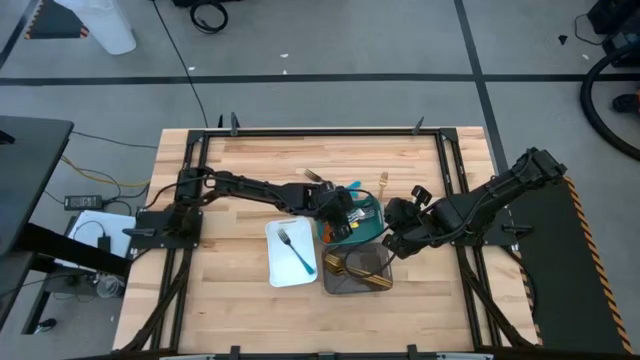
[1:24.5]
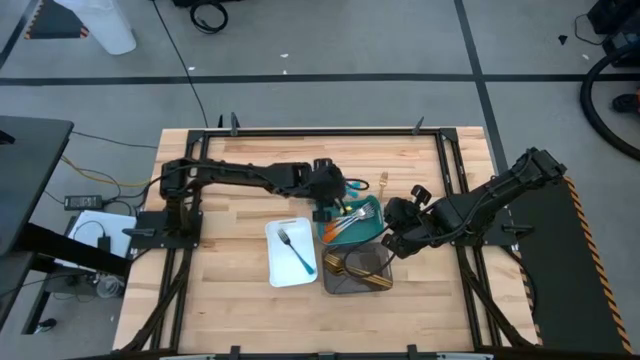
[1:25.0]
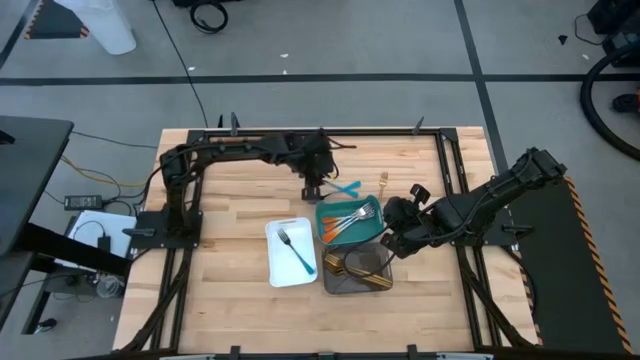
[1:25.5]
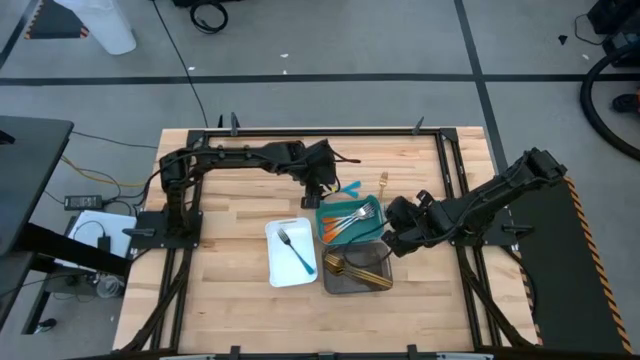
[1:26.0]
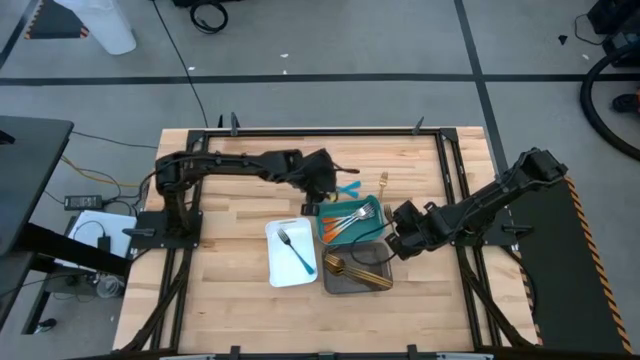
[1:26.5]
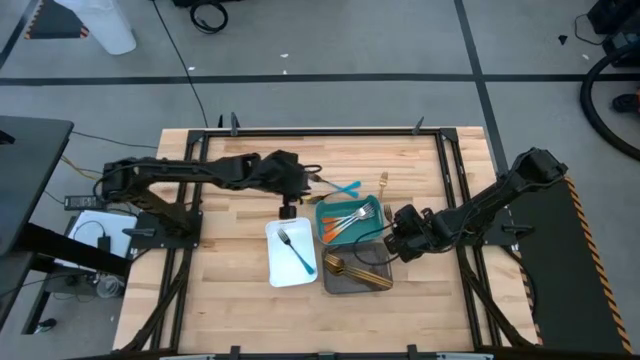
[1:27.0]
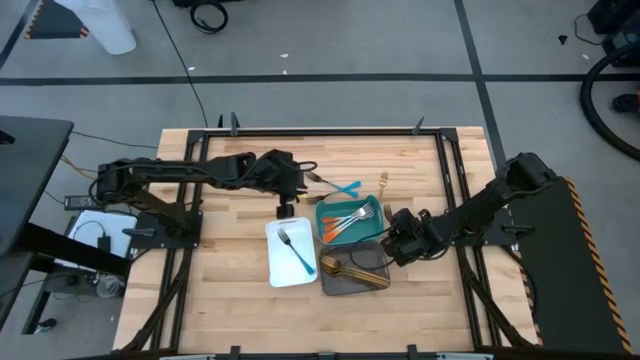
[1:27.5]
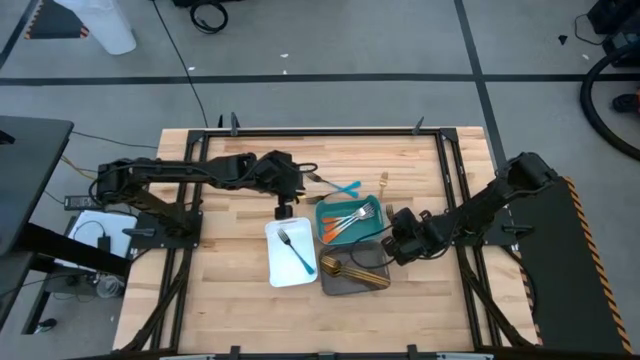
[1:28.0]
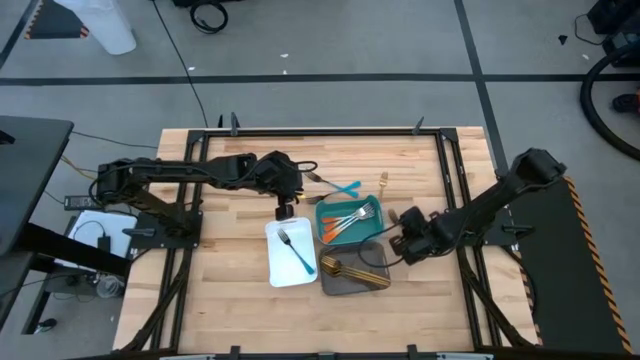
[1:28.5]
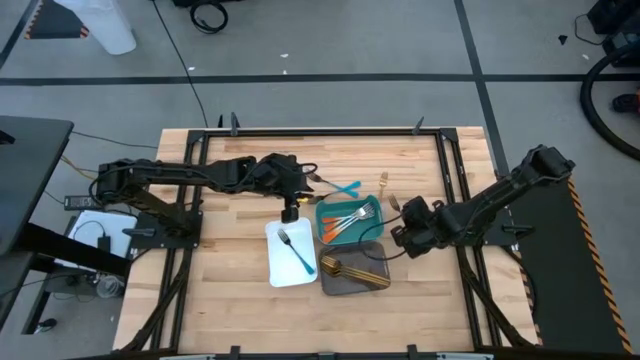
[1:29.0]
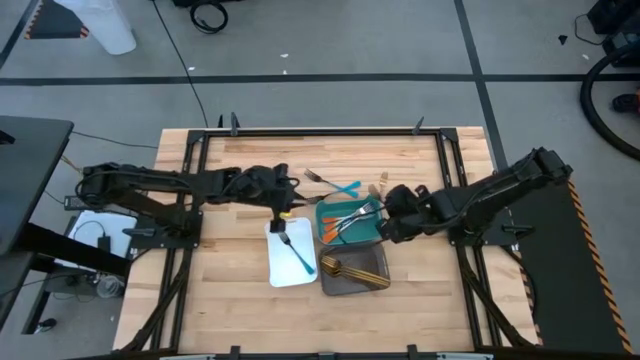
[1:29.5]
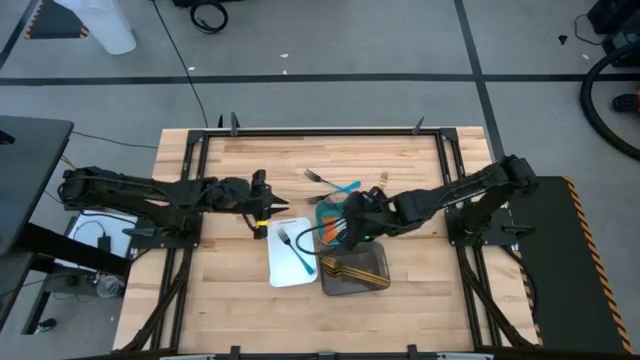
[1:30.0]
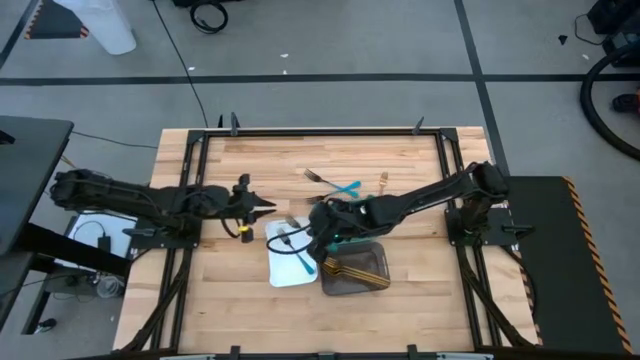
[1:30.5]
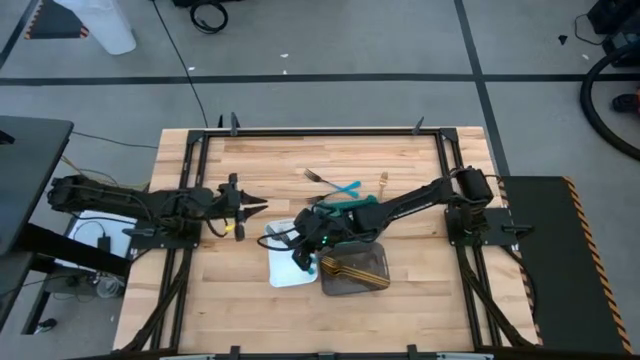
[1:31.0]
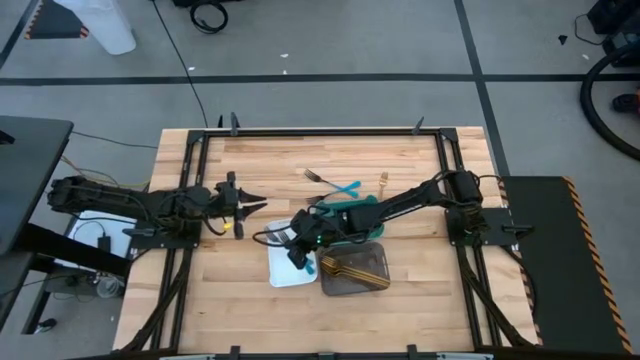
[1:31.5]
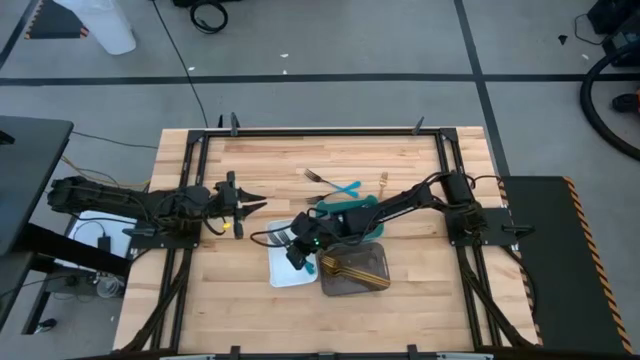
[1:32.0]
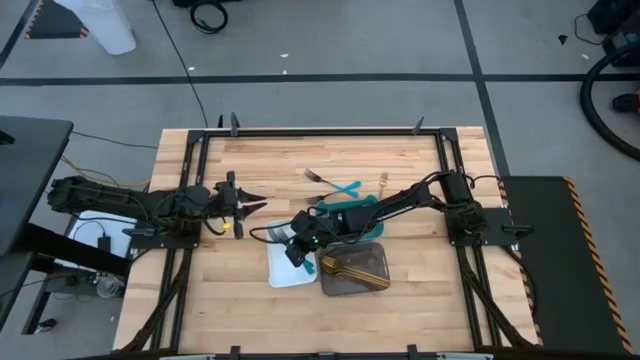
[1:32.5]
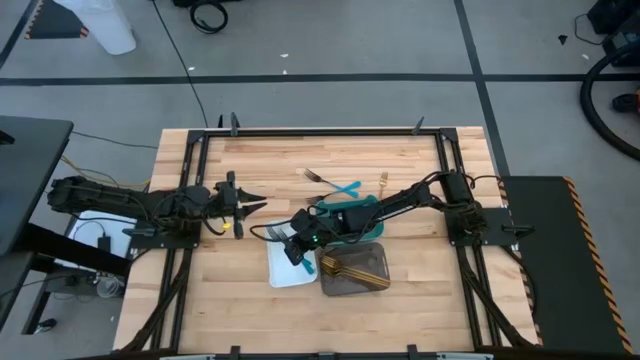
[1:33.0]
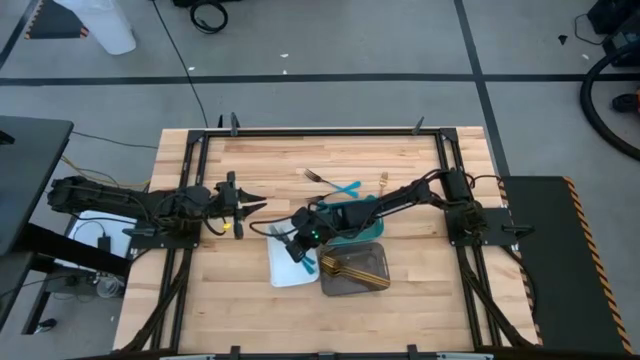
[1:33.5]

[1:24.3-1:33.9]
Task: Sort silverware by color (type)
Put the blue fork into the white bin

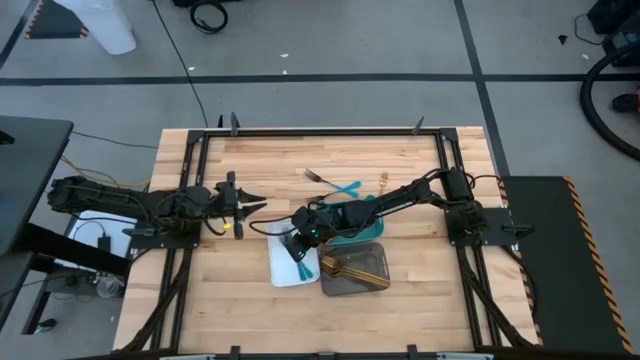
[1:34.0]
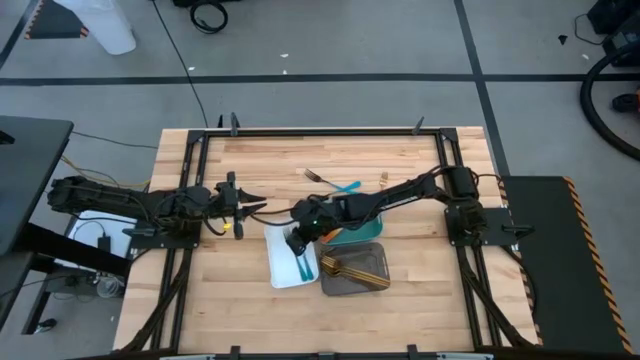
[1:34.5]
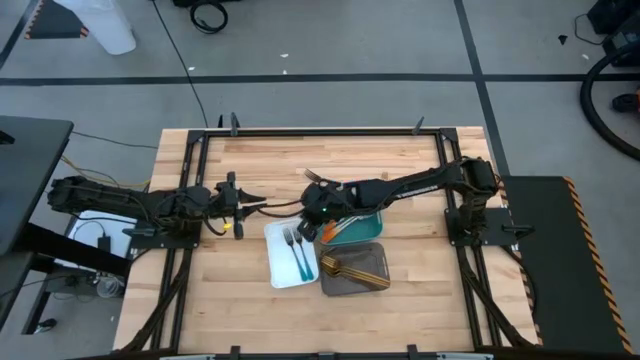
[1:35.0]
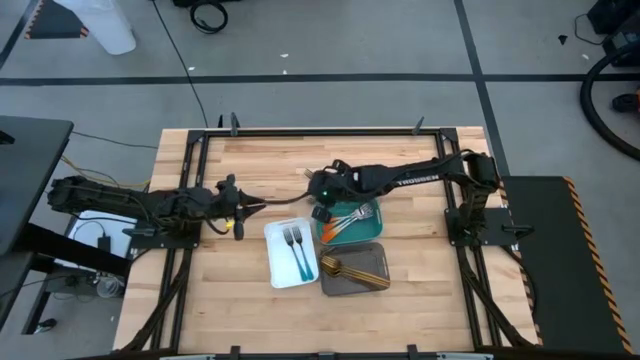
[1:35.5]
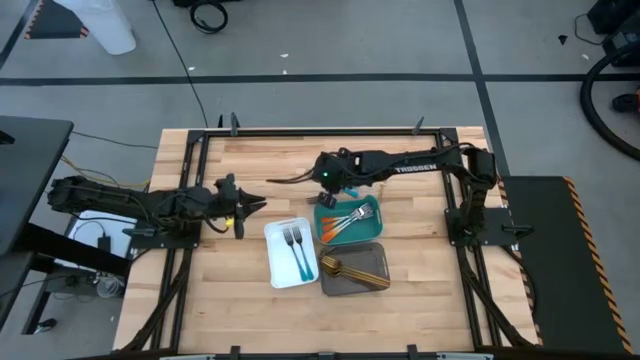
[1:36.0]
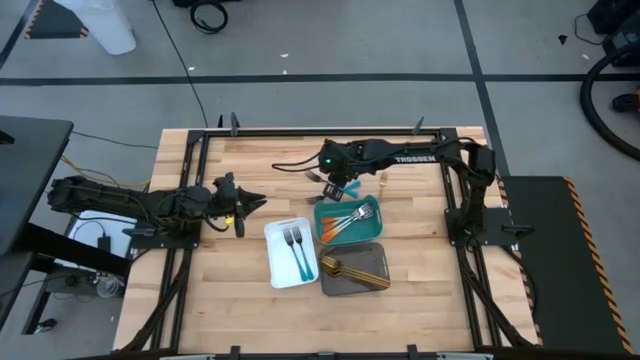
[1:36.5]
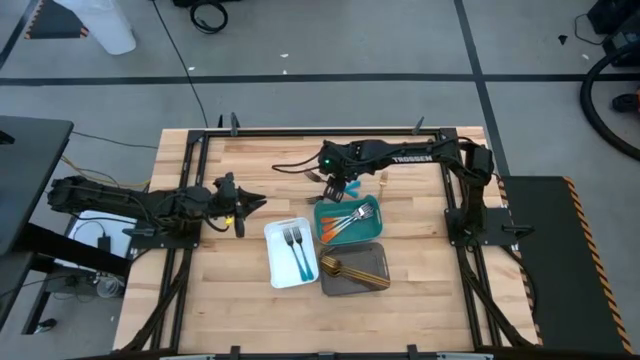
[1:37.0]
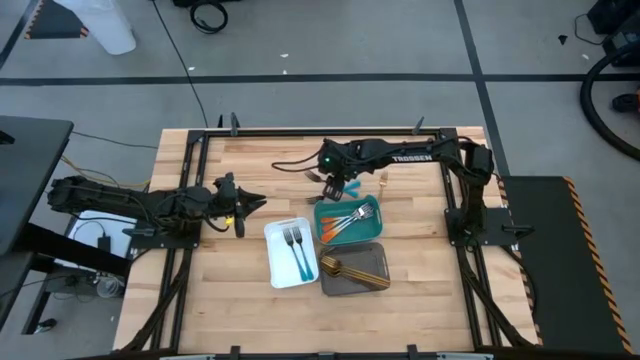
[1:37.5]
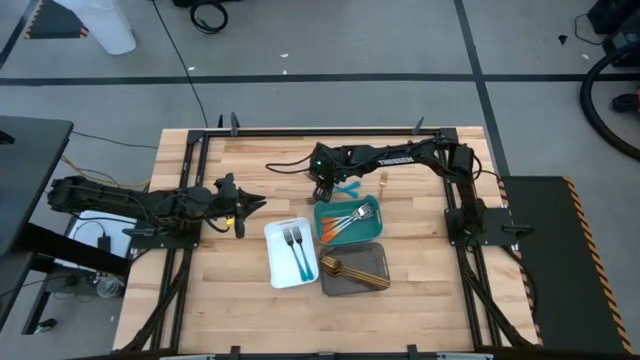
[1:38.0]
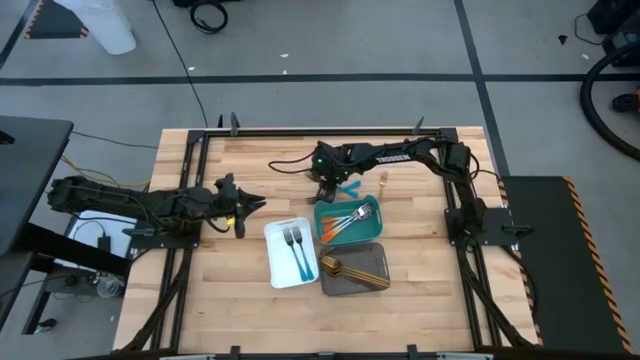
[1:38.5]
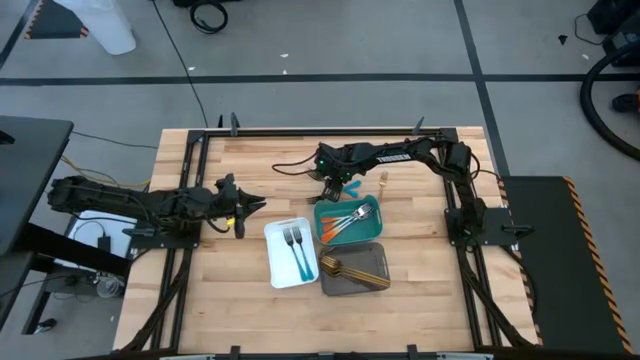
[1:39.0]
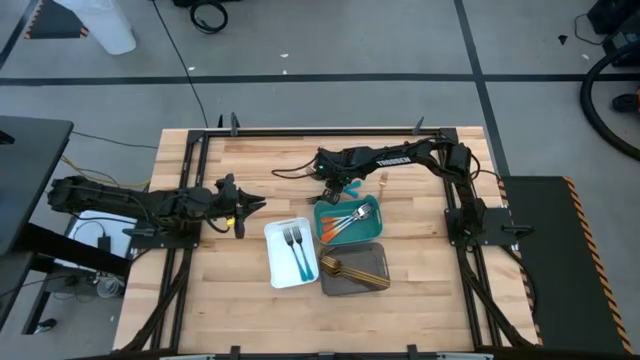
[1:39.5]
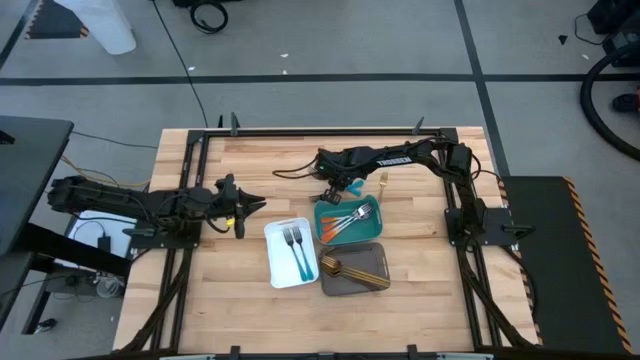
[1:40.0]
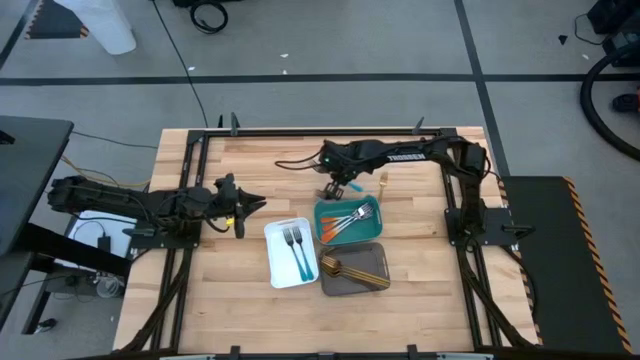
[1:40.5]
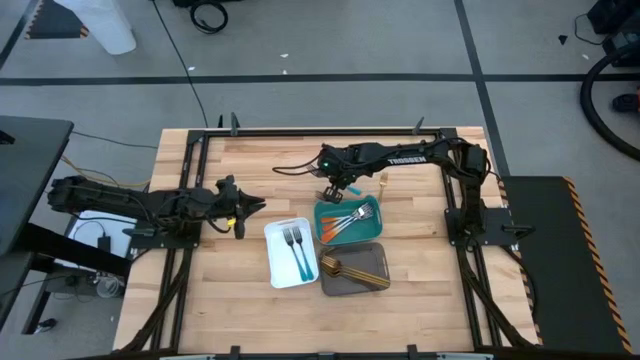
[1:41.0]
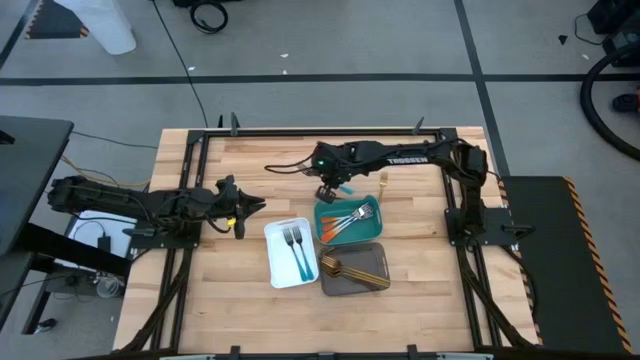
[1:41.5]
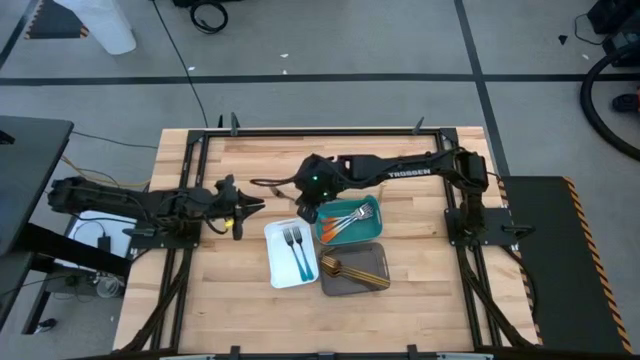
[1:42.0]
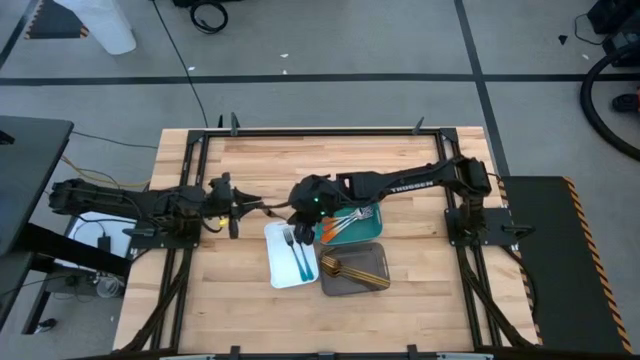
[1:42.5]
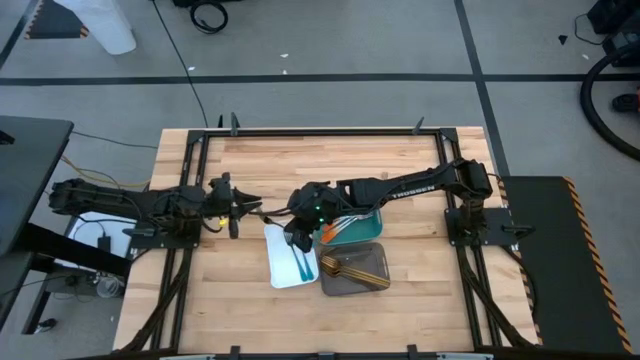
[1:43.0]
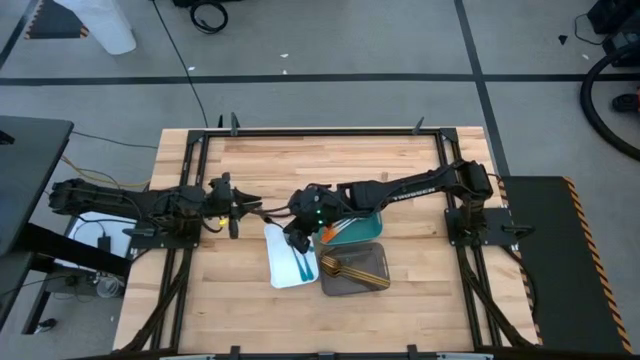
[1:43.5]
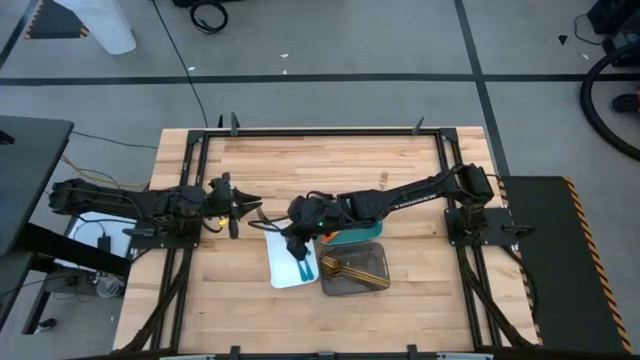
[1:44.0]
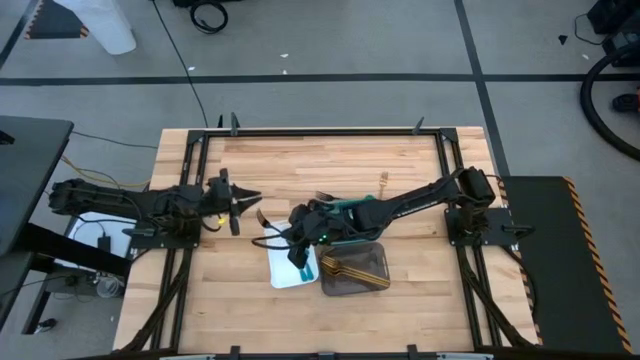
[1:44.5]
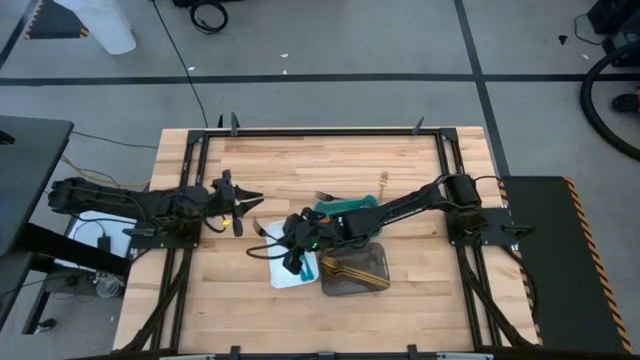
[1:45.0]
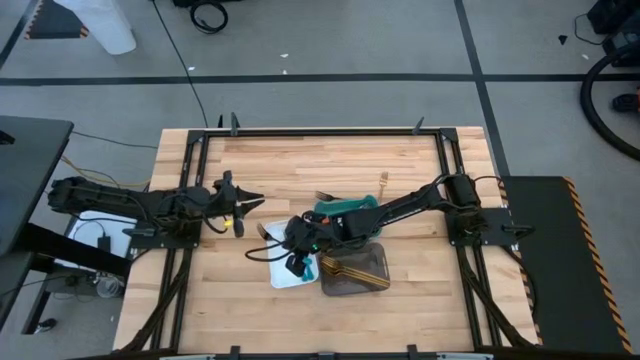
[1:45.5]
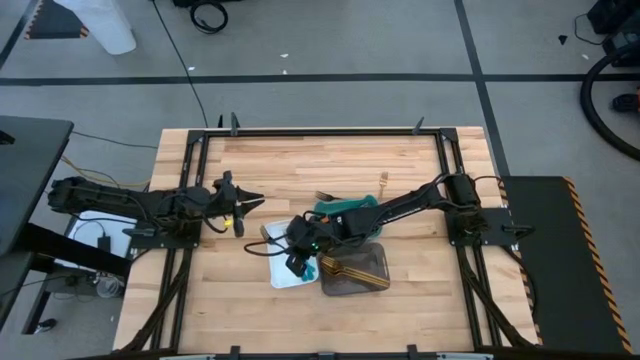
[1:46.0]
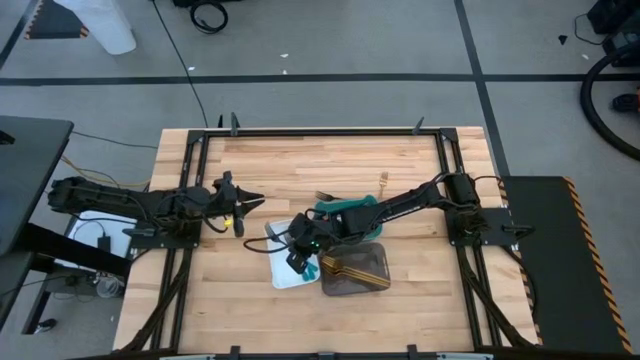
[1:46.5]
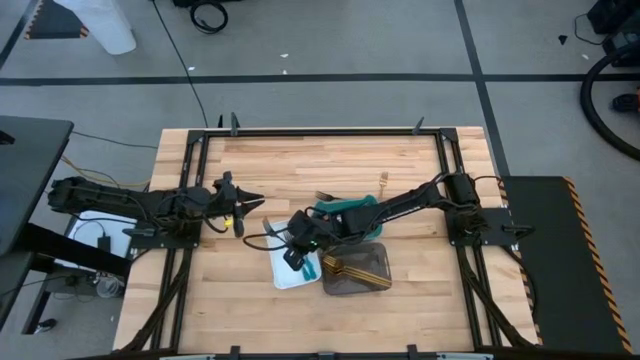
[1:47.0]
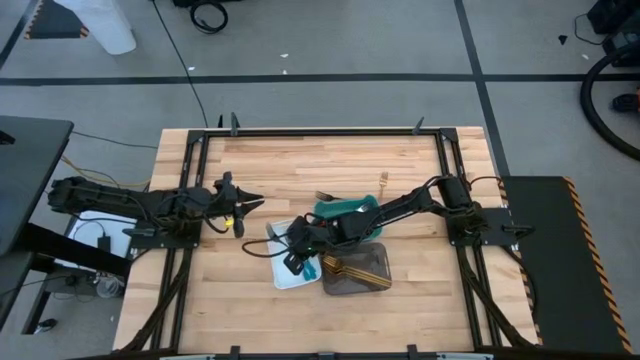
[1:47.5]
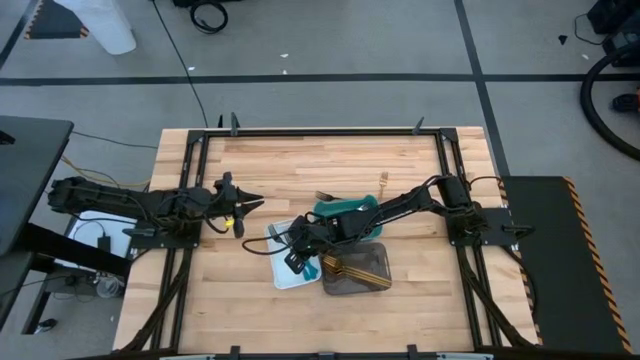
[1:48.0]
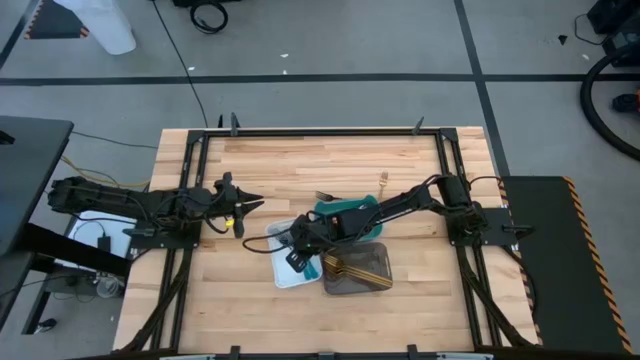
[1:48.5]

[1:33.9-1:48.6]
Put the blue fork into the white bin
